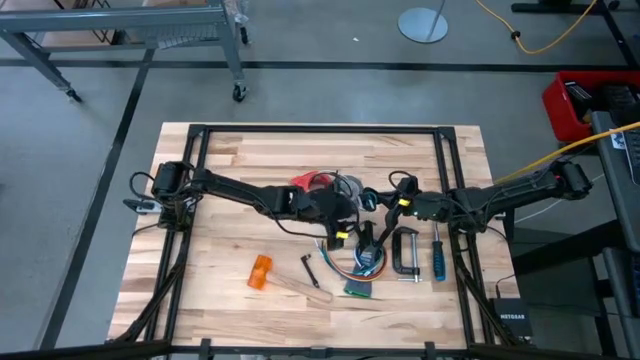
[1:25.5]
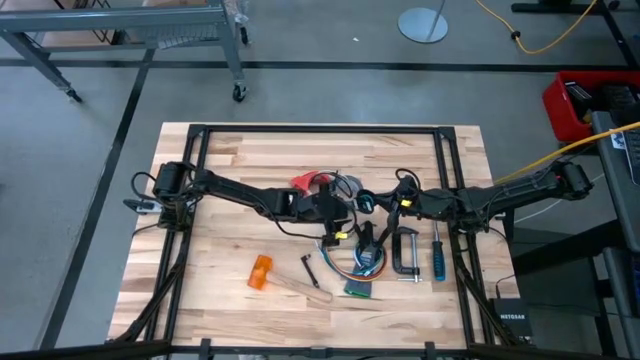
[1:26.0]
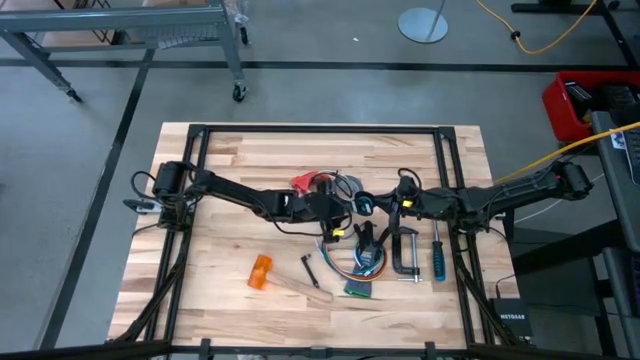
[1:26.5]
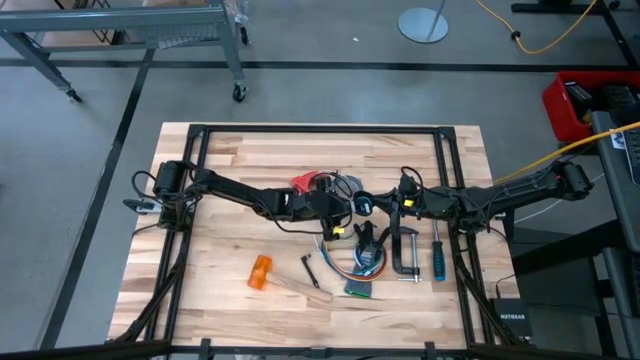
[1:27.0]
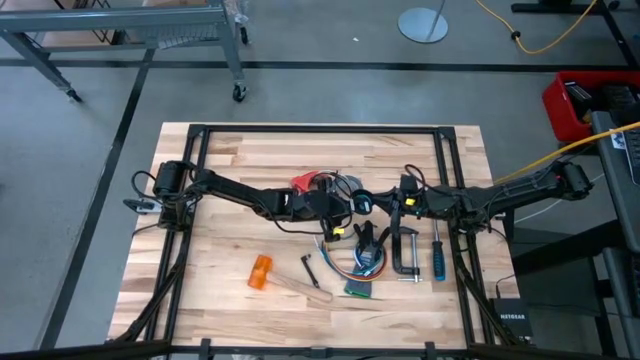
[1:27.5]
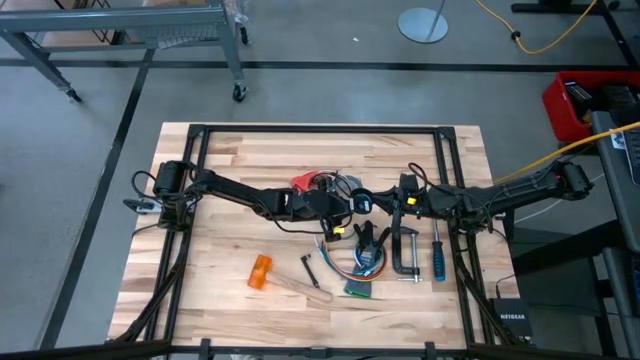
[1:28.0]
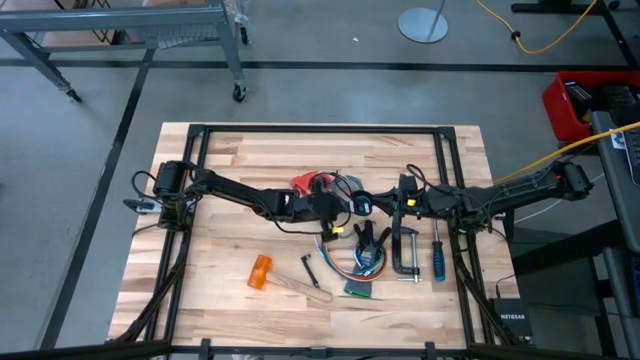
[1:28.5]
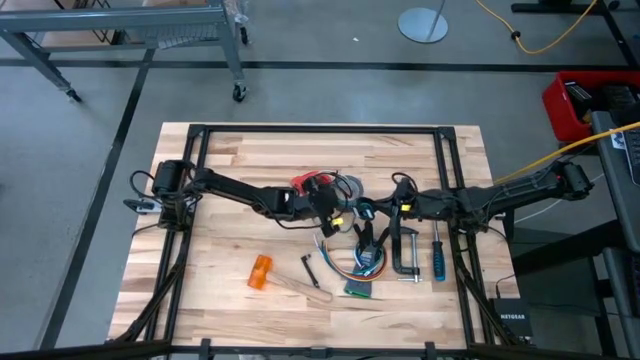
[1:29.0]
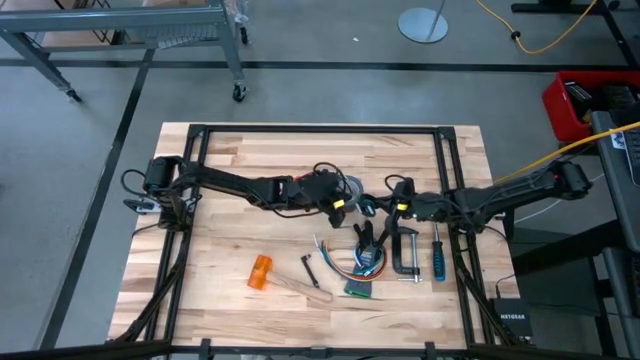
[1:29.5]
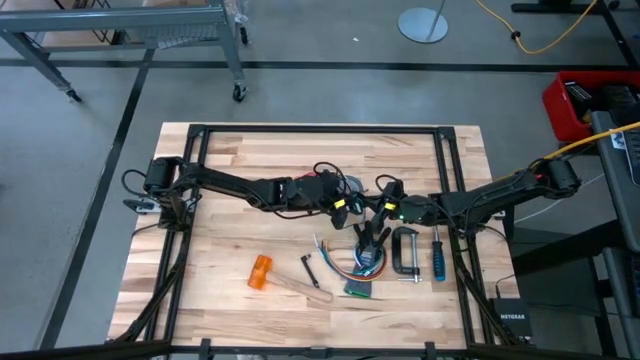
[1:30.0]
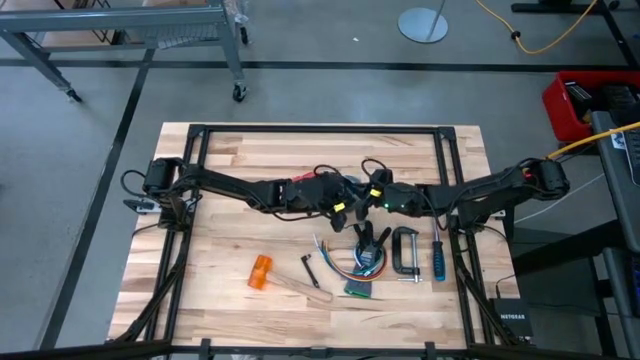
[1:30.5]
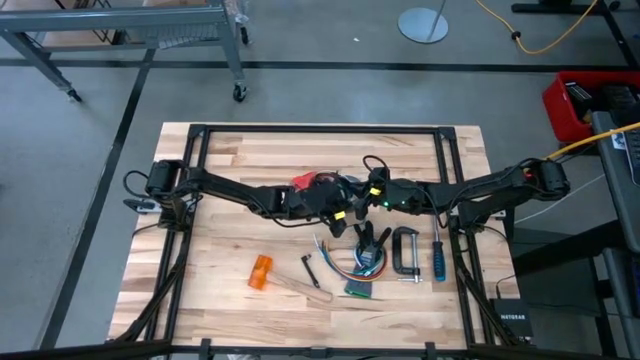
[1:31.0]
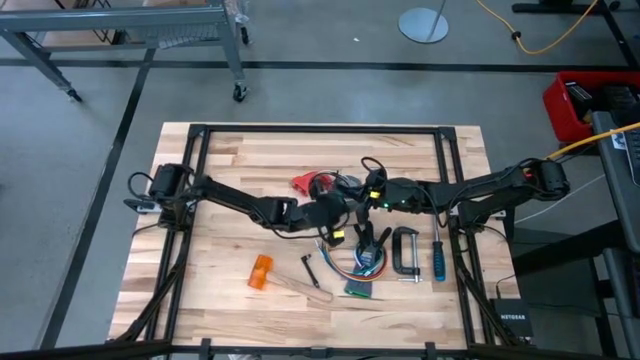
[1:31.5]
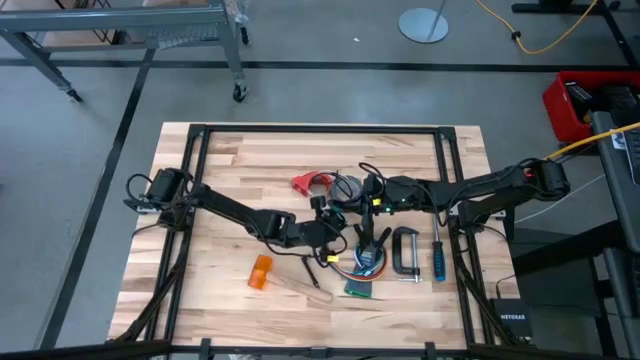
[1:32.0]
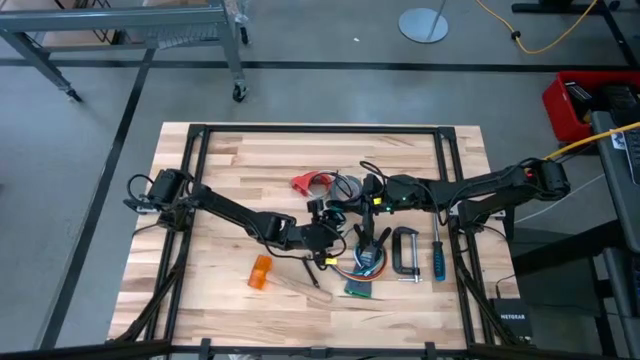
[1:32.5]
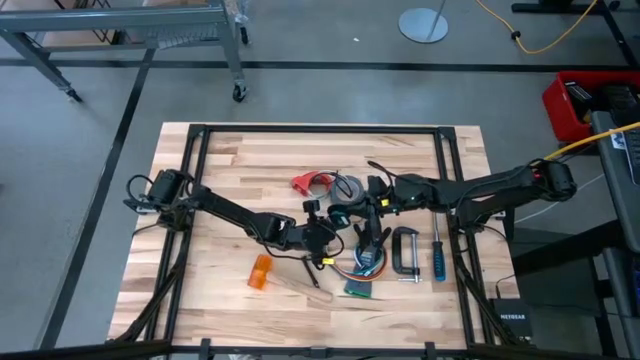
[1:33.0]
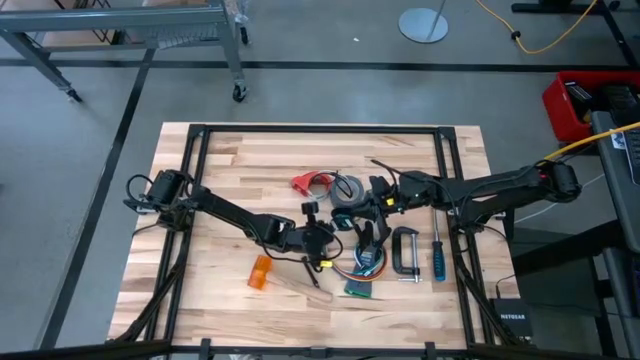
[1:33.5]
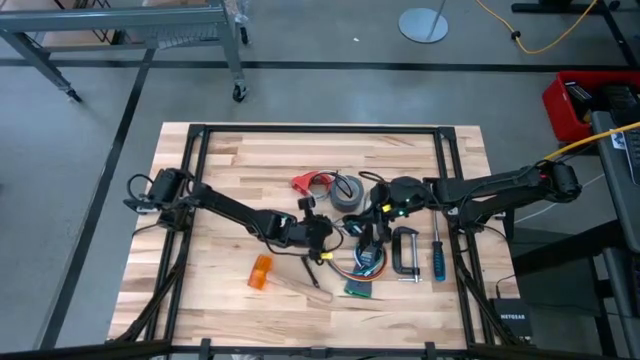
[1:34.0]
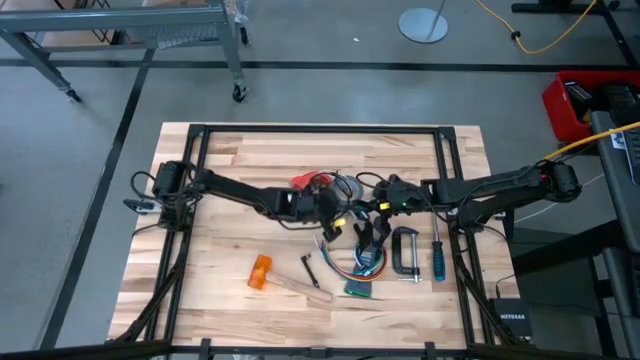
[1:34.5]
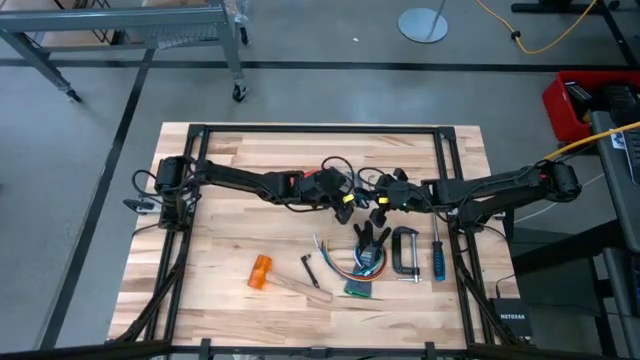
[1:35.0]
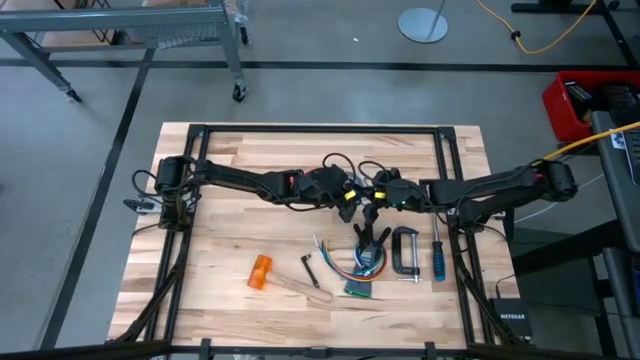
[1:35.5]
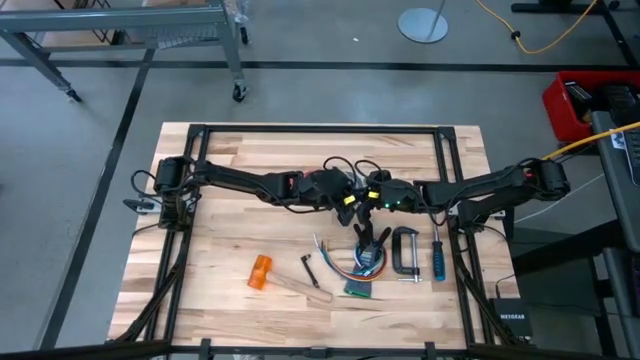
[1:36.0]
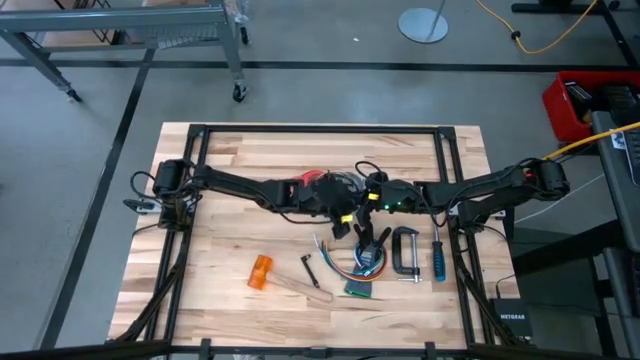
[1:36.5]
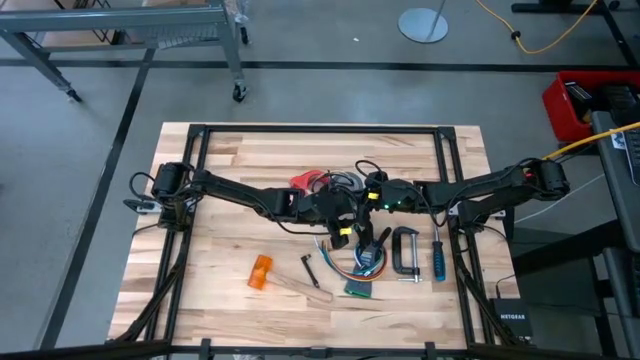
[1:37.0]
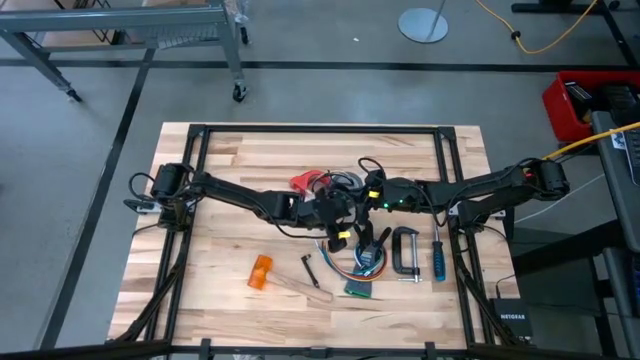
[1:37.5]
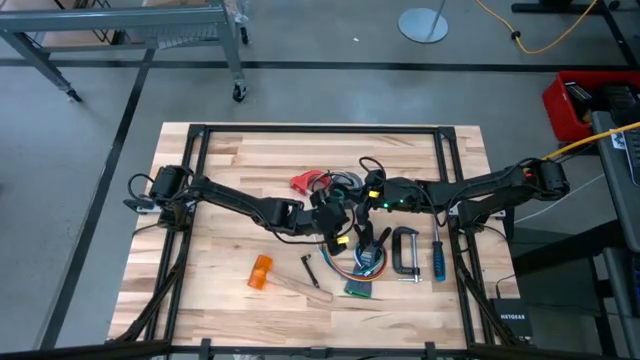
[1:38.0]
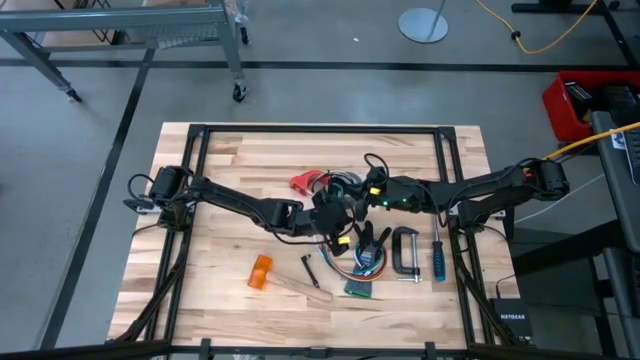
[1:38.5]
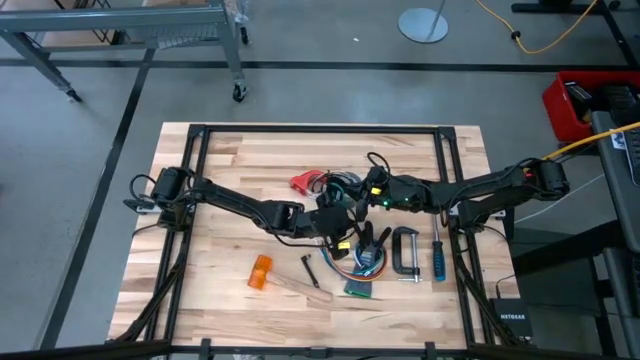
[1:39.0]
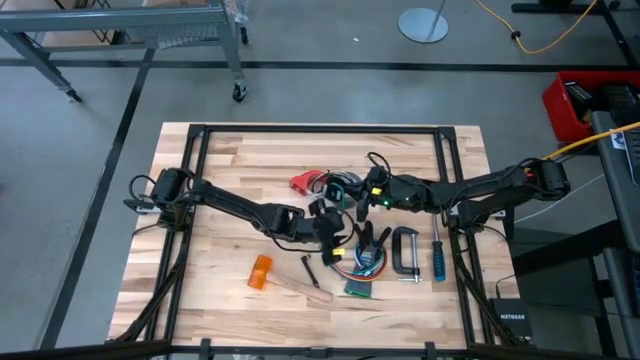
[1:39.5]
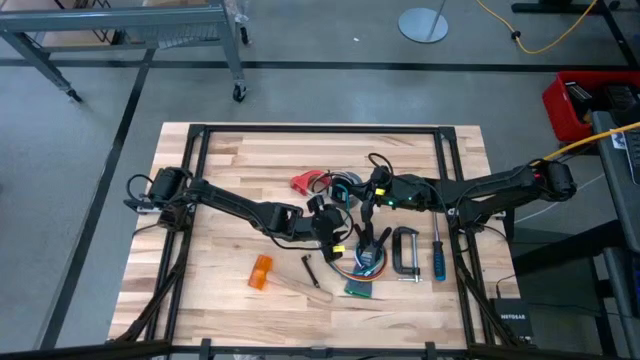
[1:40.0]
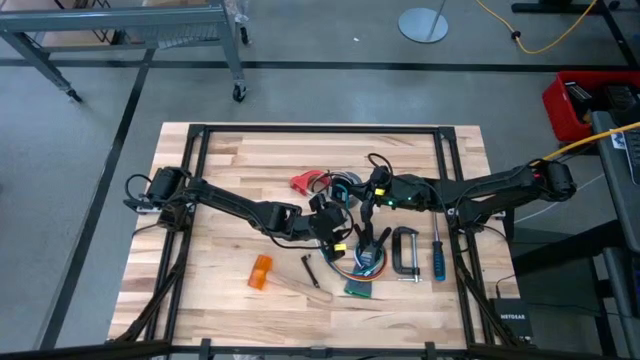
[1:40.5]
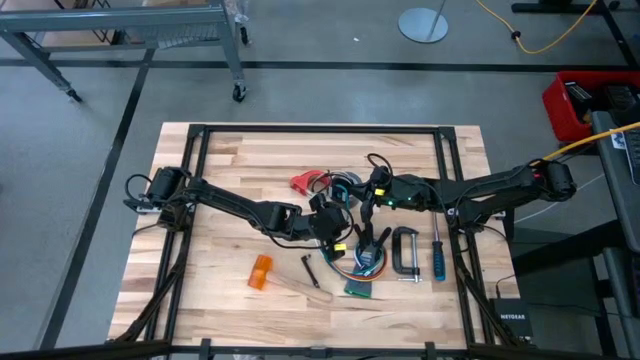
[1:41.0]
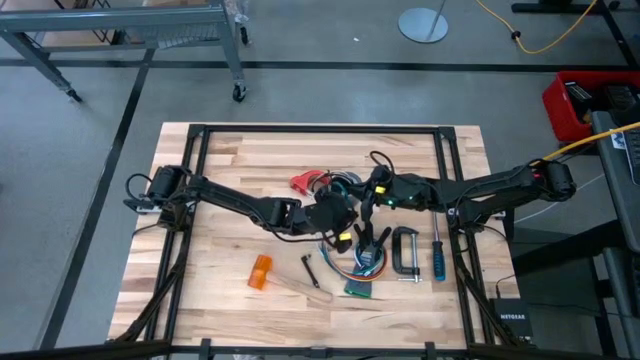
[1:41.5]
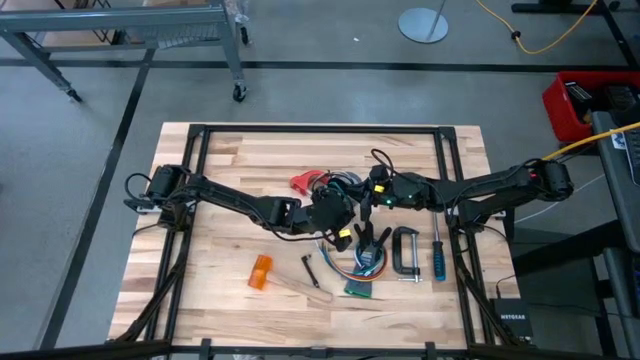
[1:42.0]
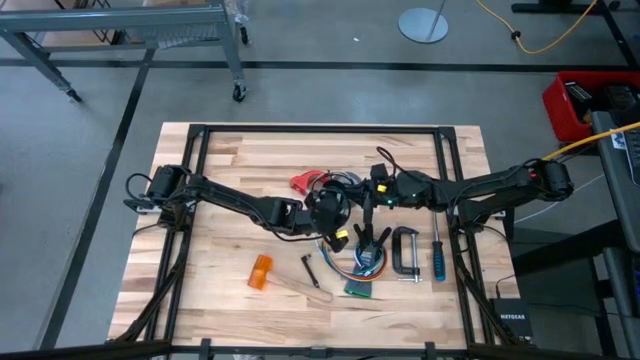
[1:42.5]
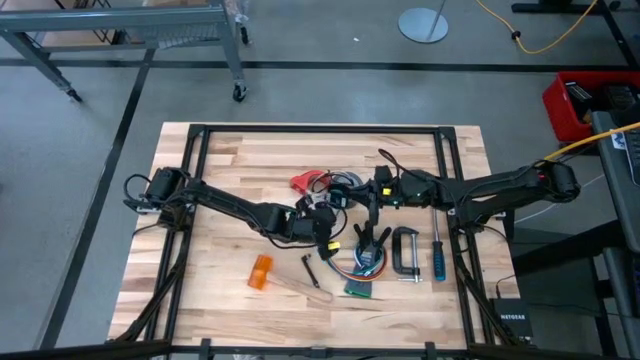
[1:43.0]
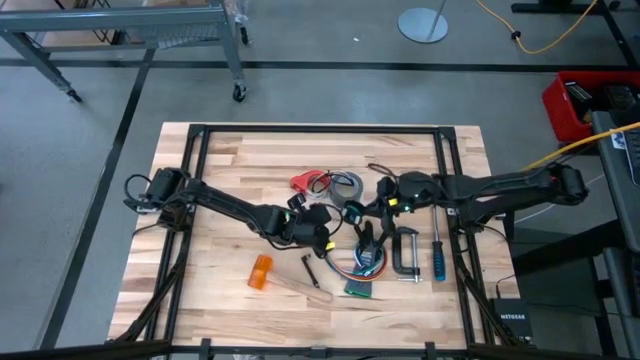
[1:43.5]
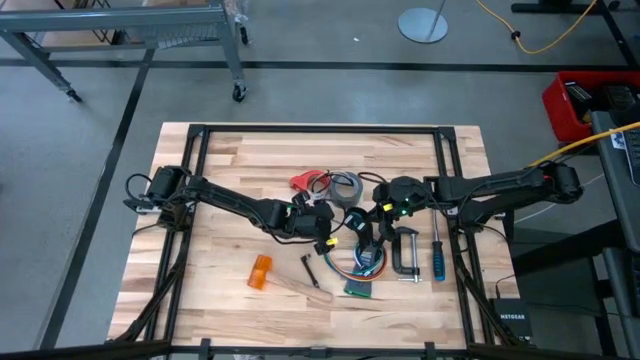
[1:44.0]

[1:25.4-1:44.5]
Task: Coil cords
Coil the blue wire onto the spool

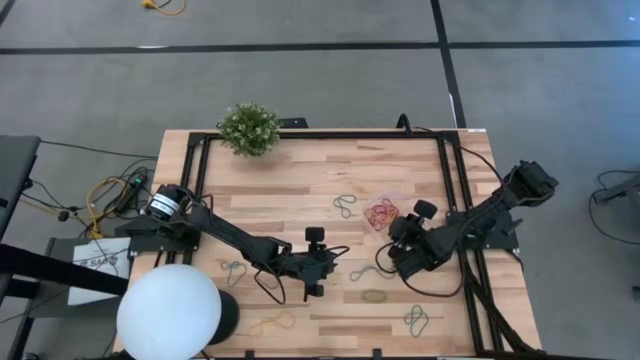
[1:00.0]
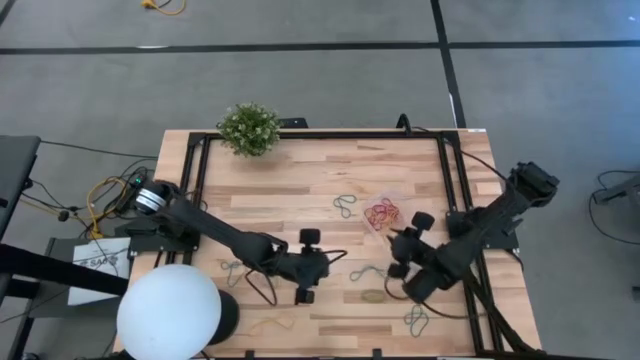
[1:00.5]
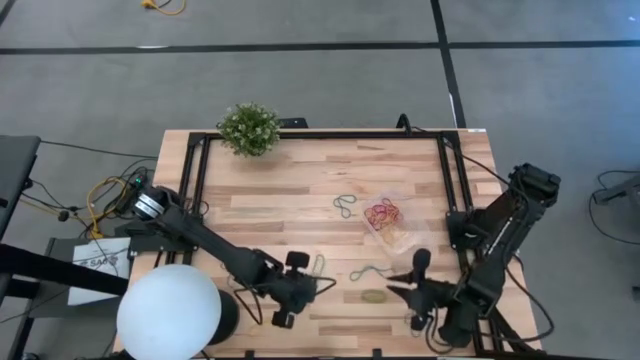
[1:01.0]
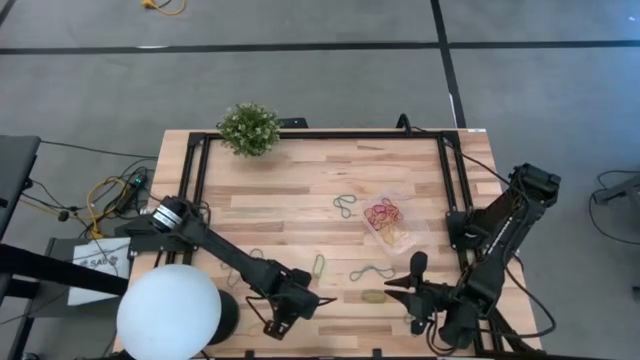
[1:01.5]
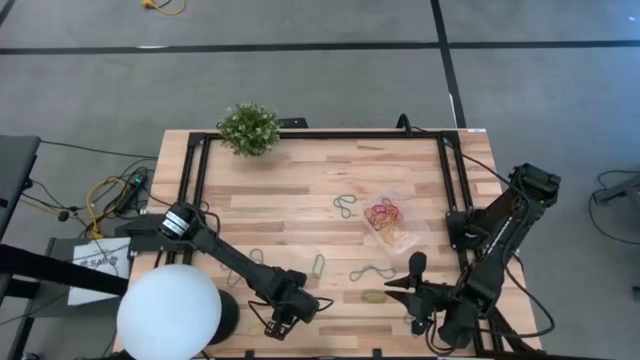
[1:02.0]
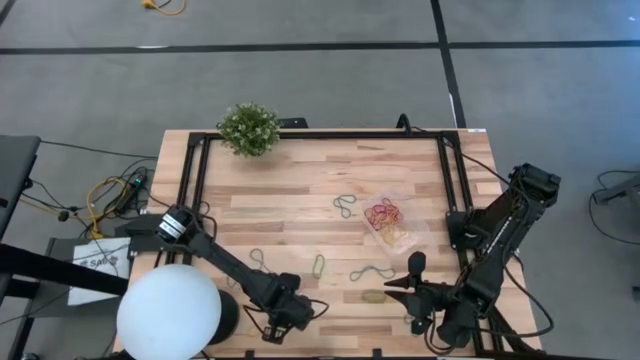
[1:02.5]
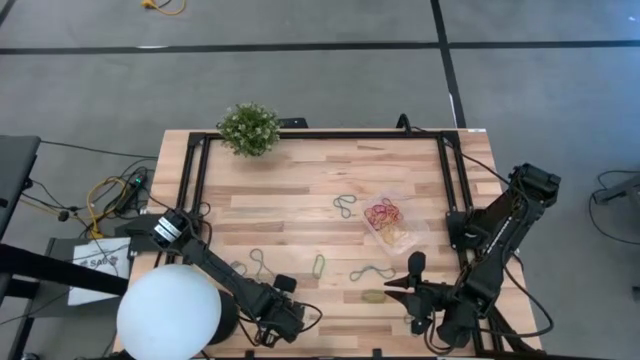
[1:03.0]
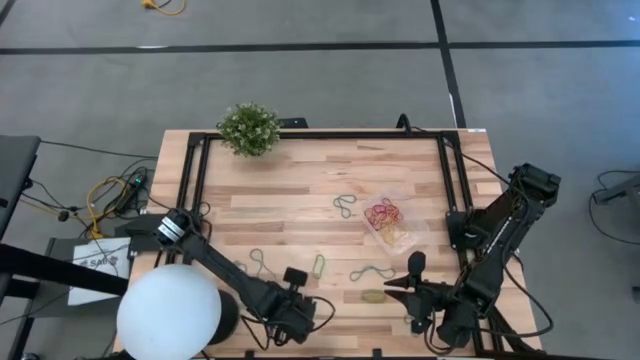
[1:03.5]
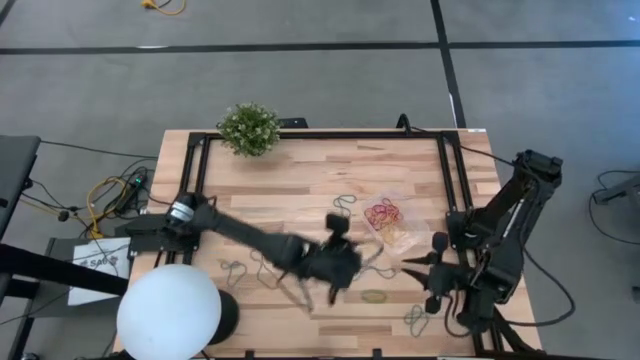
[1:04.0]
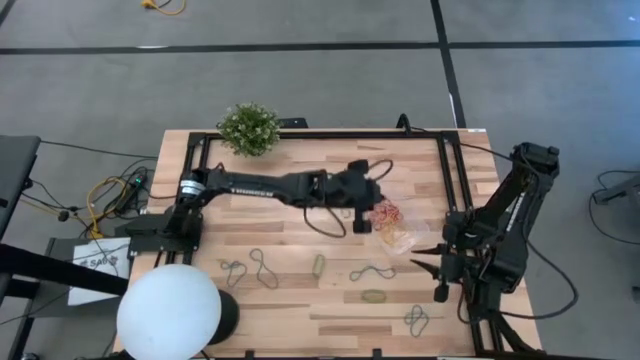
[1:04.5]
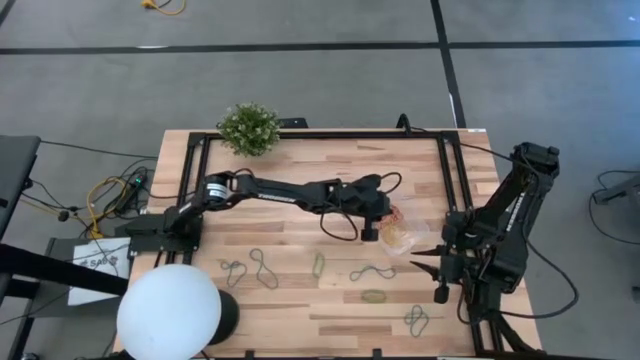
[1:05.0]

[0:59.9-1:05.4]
Task: Pick and place items into bin
Put the yellow rubber band into the transparent bin
